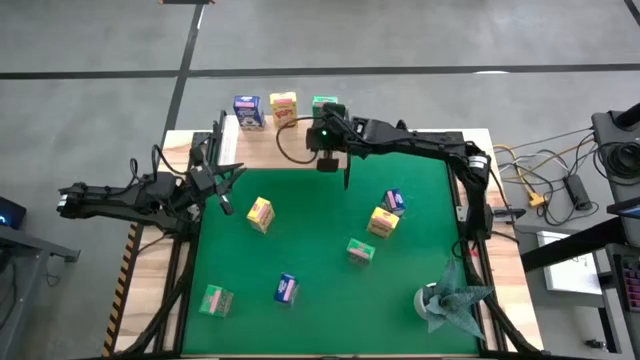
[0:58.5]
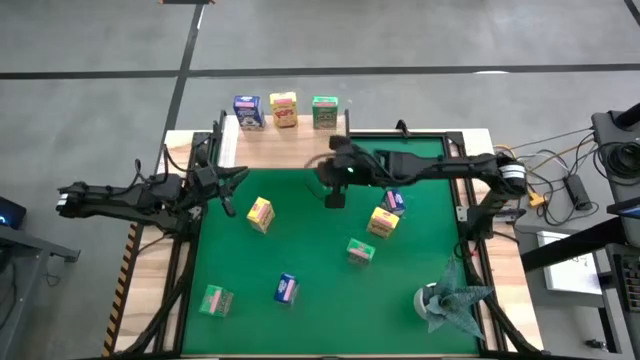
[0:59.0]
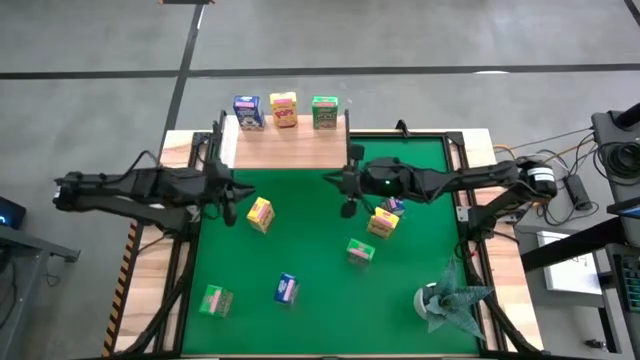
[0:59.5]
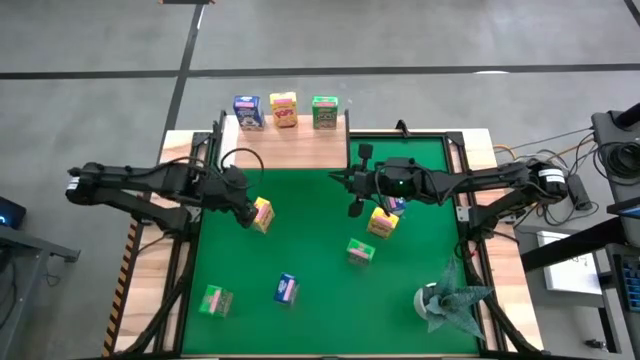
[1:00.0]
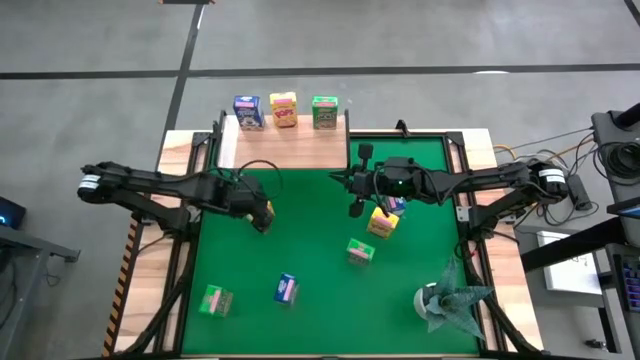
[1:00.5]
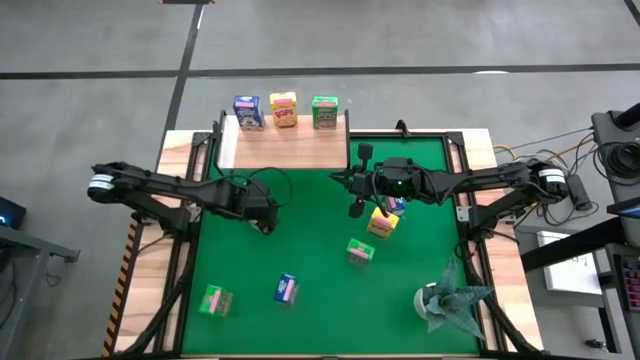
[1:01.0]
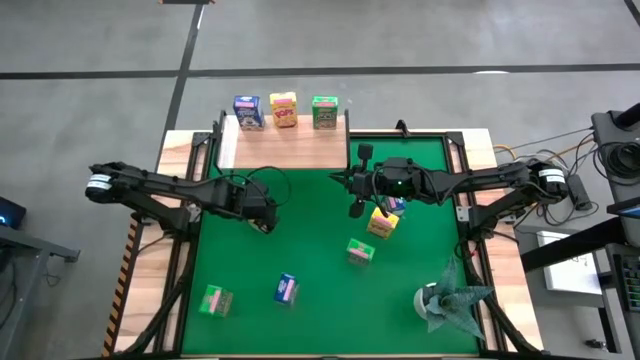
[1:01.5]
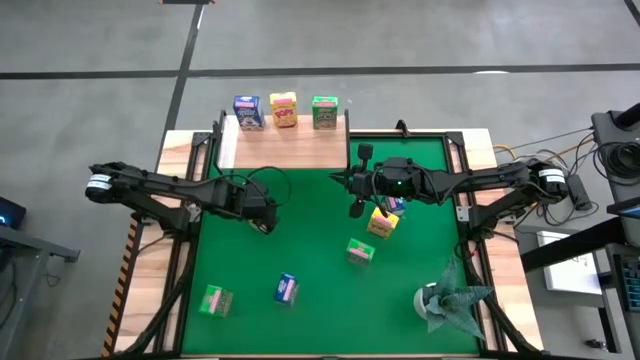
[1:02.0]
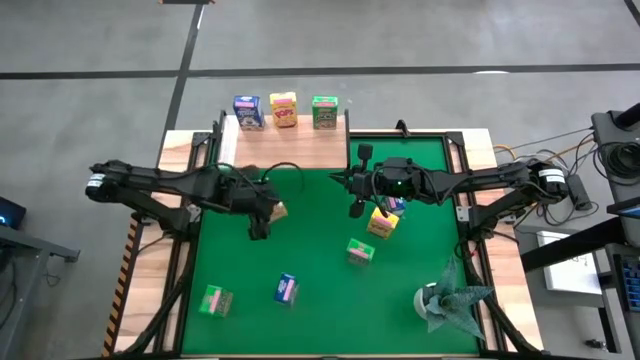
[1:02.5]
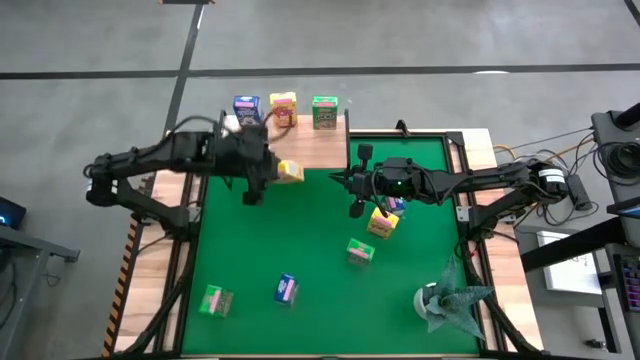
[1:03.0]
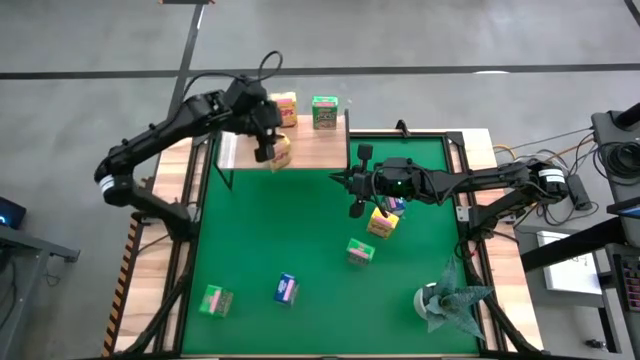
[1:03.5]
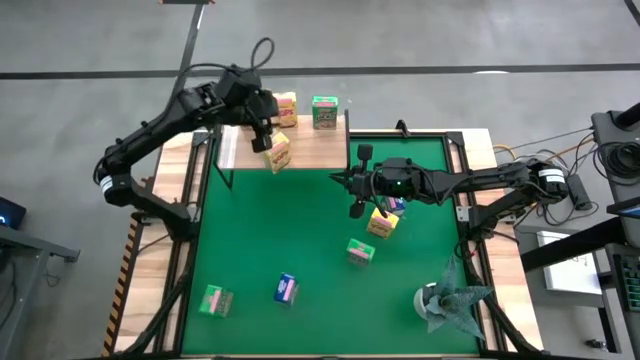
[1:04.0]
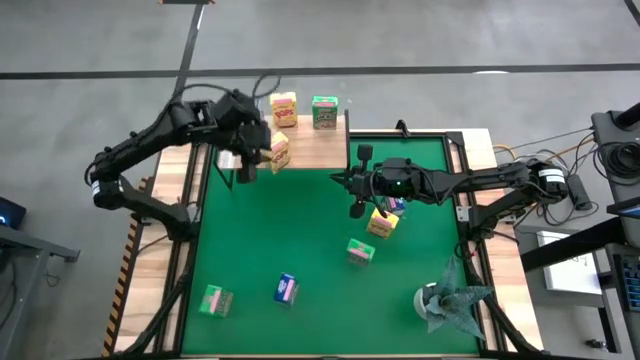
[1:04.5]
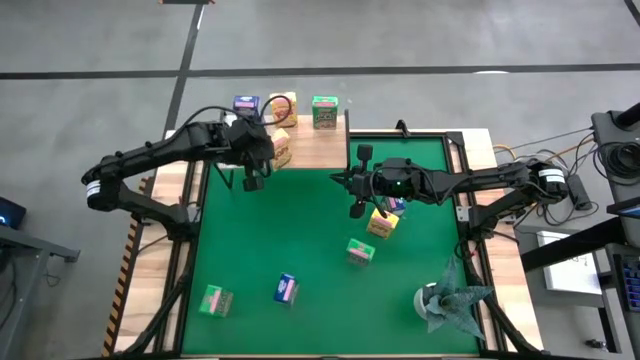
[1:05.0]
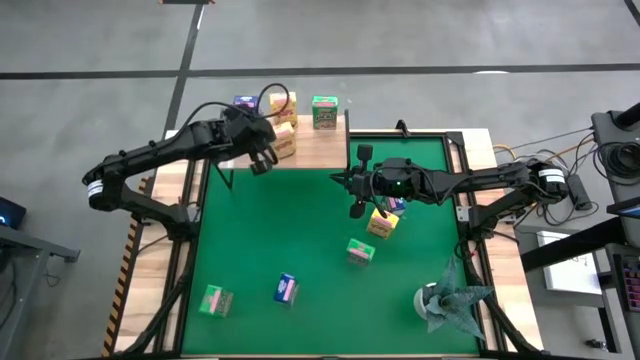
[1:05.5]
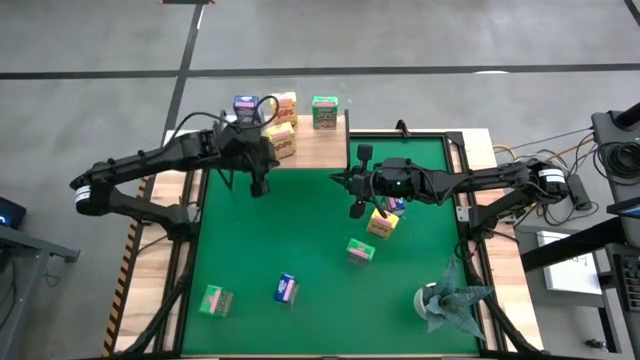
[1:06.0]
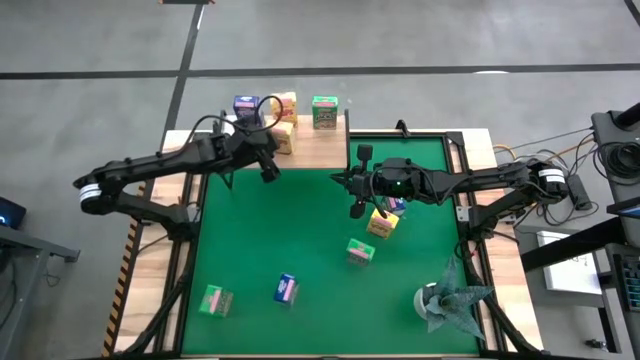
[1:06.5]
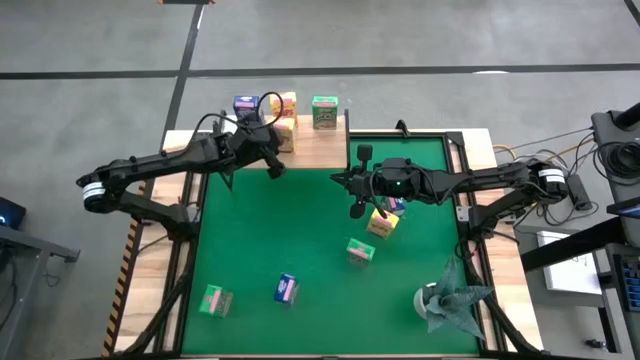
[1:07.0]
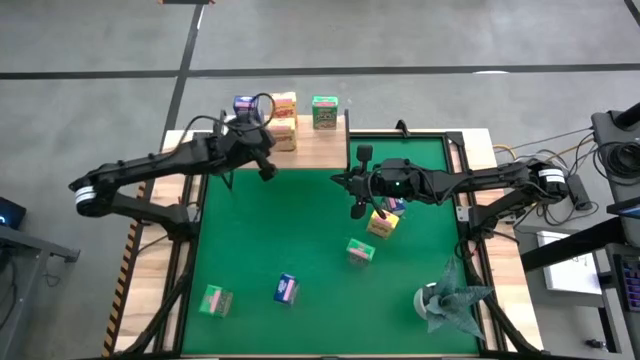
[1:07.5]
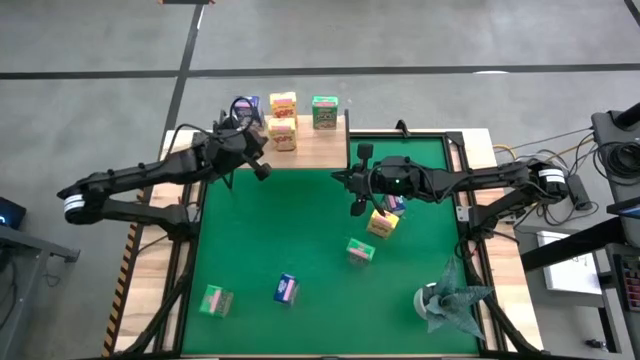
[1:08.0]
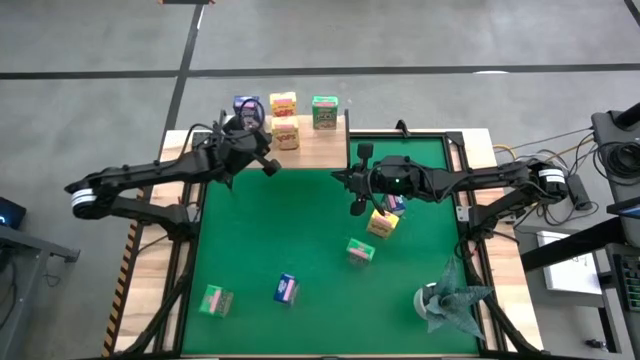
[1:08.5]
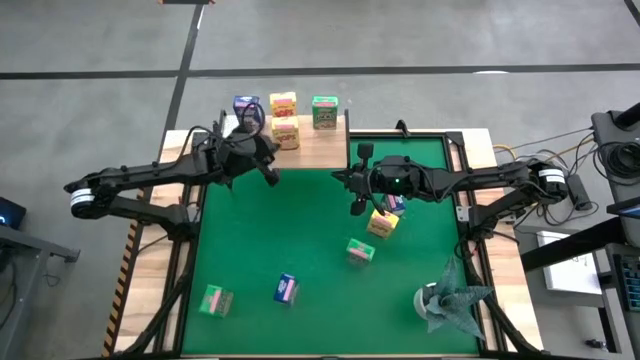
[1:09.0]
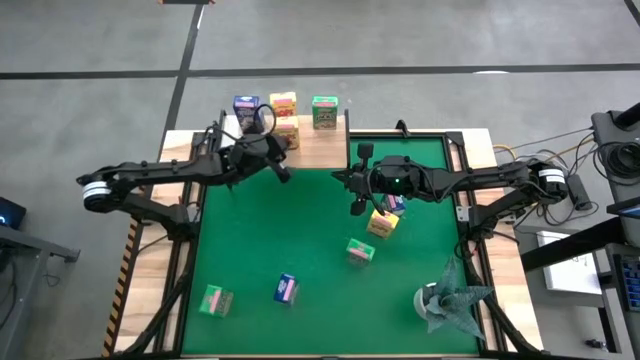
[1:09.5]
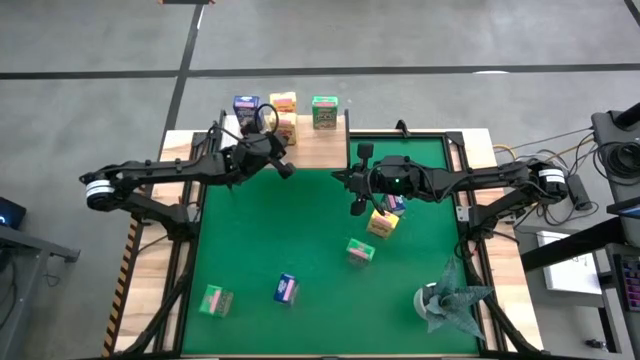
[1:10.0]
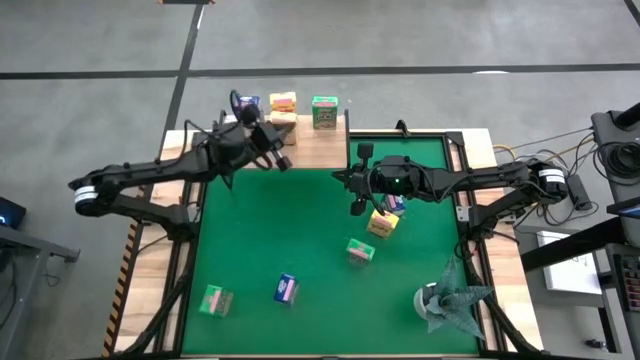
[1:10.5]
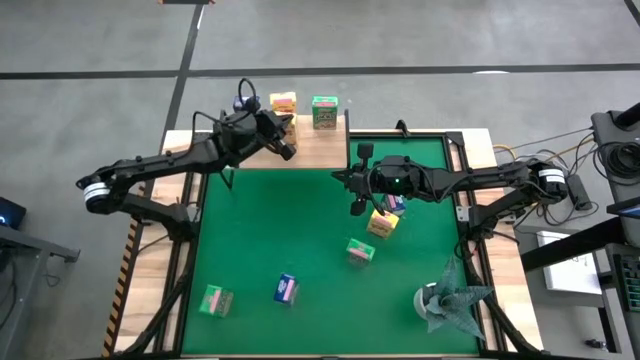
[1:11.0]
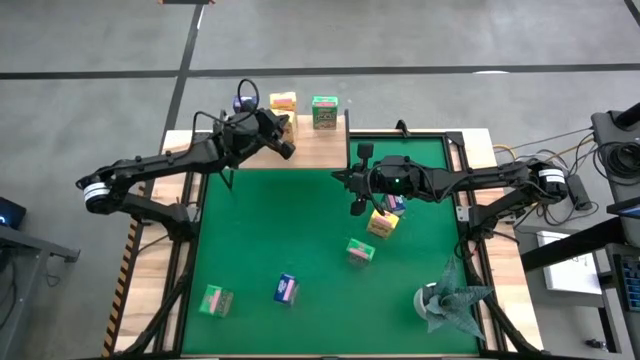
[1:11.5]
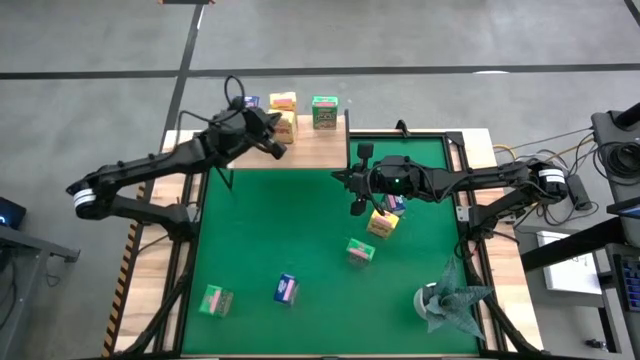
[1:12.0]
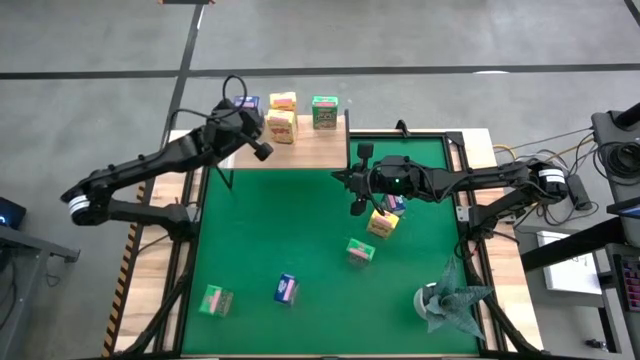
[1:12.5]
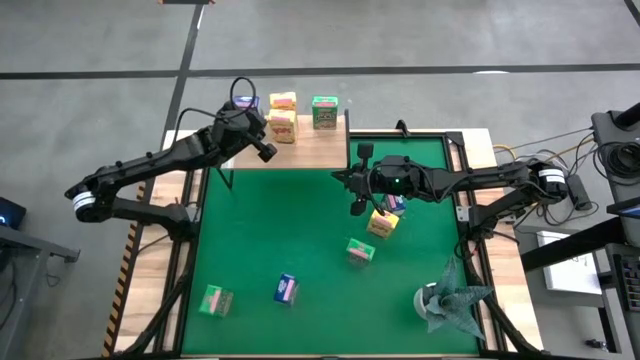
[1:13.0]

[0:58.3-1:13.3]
Task: Stack cereal on shelf
Put the left yellow cereal box on the shelf aligned with the other yellow cereal box

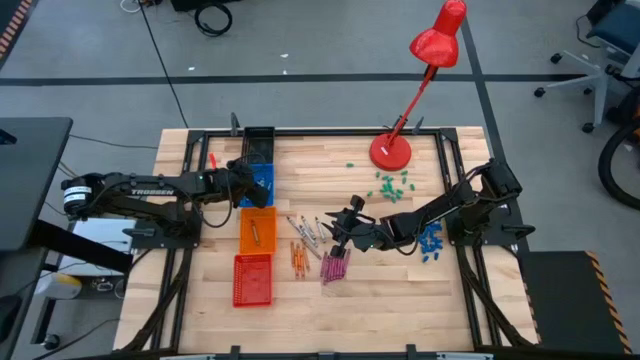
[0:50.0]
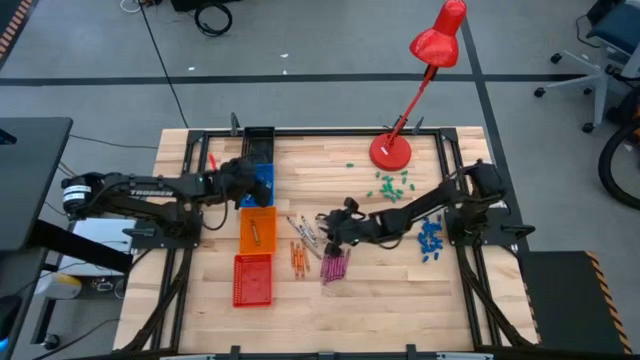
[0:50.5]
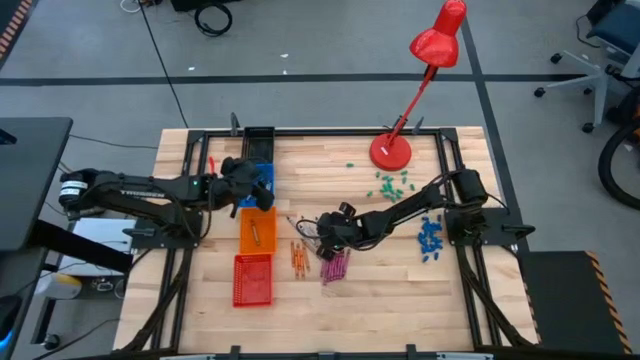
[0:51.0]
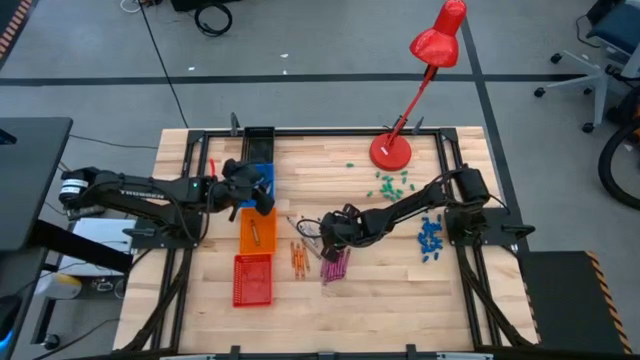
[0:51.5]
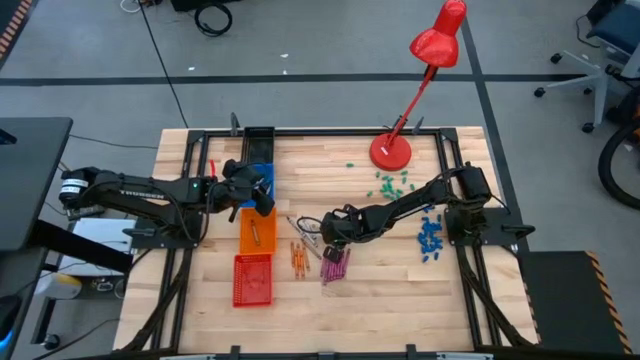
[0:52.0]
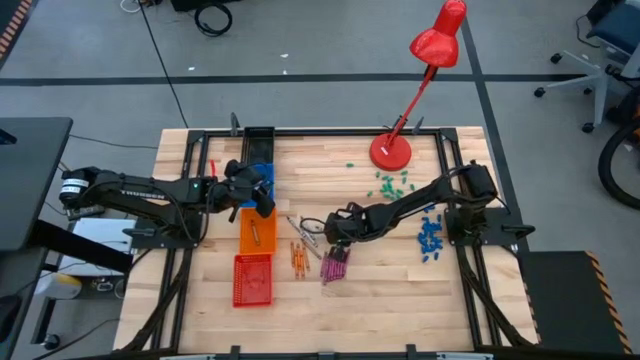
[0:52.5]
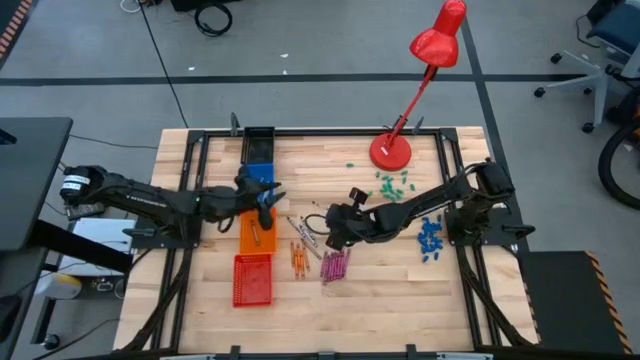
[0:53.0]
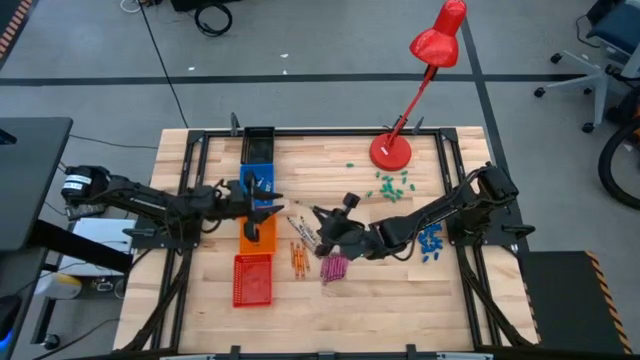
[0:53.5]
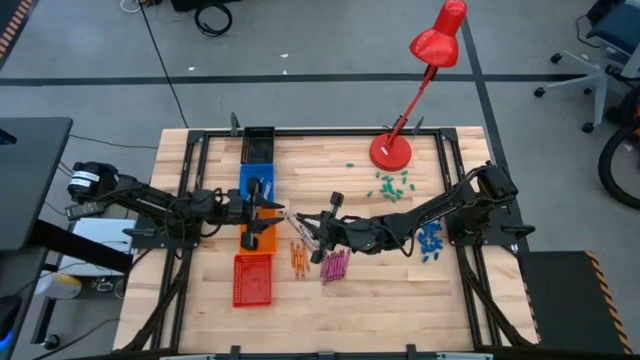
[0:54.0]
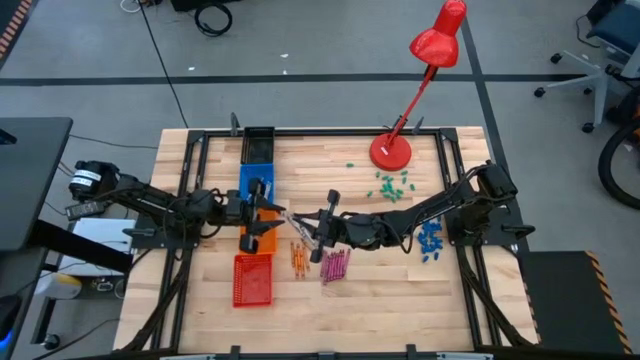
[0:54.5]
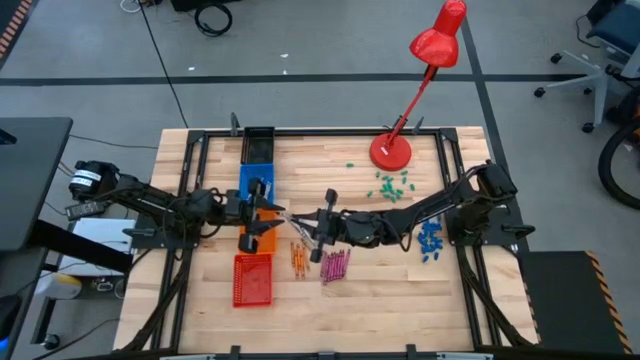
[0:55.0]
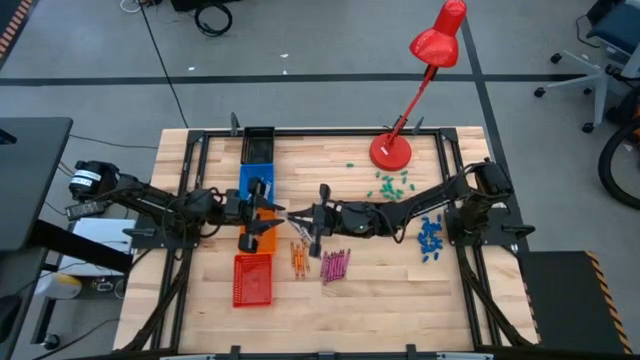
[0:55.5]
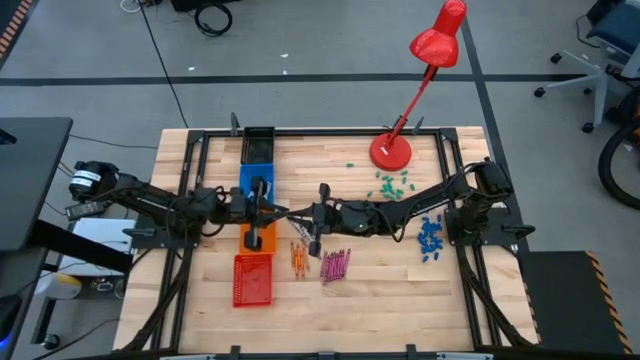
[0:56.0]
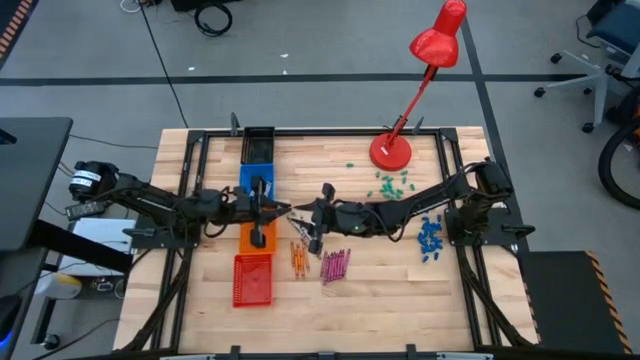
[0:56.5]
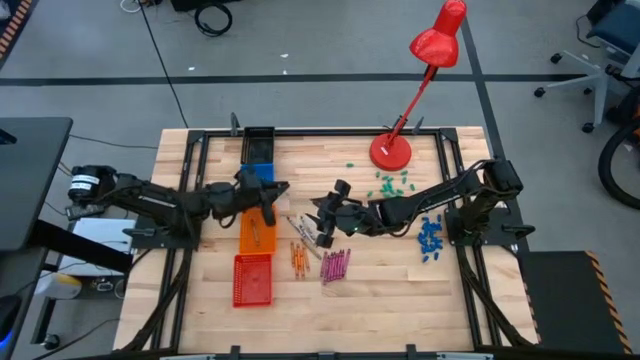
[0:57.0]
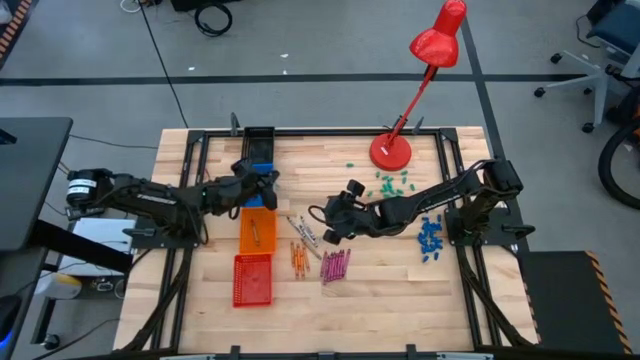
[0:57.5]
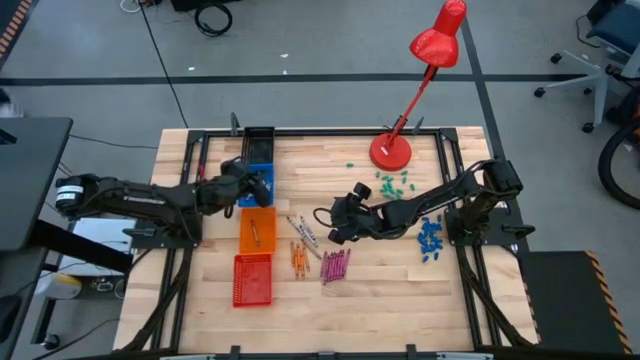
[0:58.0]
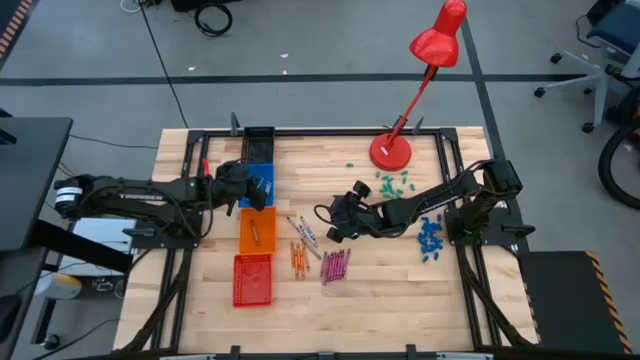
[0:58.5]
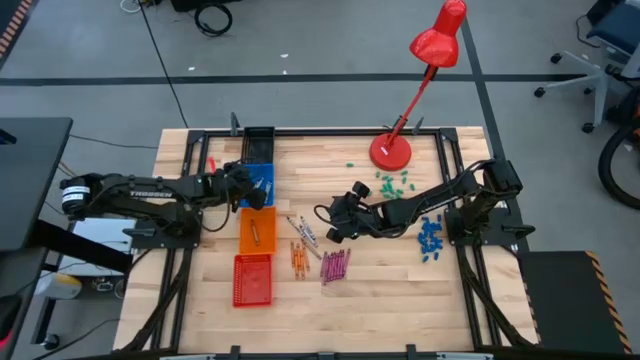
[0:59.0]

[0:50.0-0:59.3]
Task: Sort crayons
Put the black crayon into the blue bin
